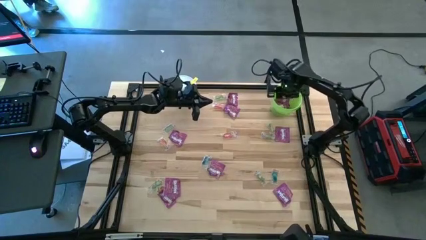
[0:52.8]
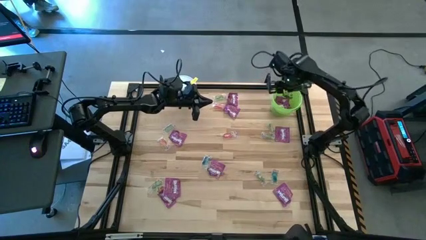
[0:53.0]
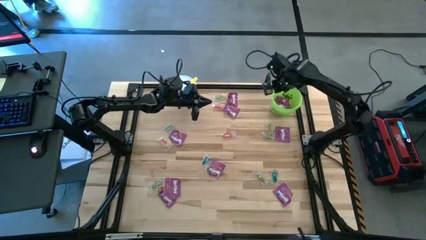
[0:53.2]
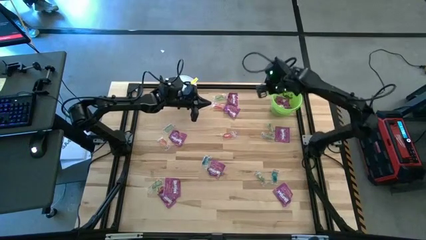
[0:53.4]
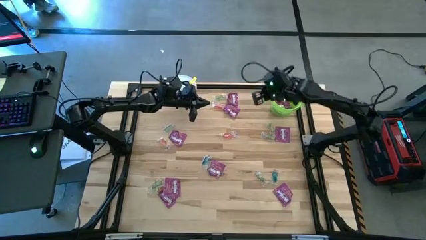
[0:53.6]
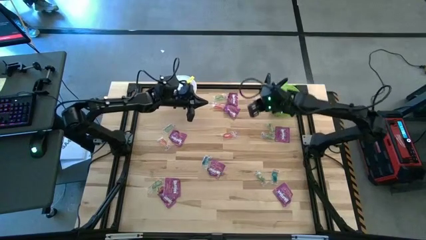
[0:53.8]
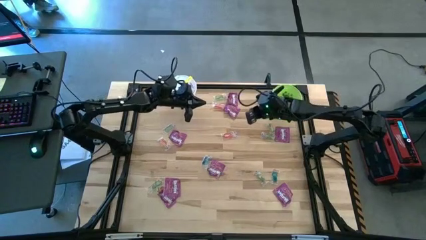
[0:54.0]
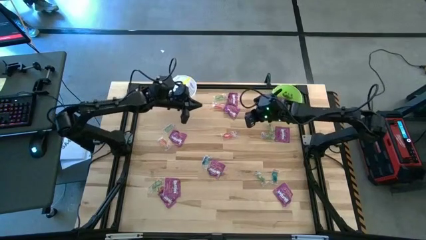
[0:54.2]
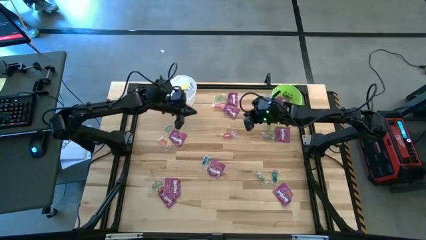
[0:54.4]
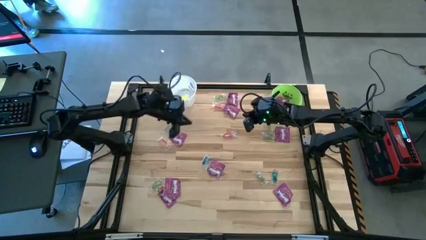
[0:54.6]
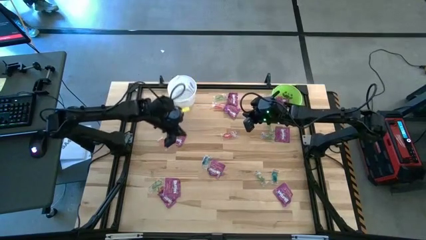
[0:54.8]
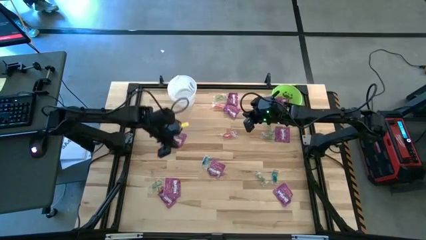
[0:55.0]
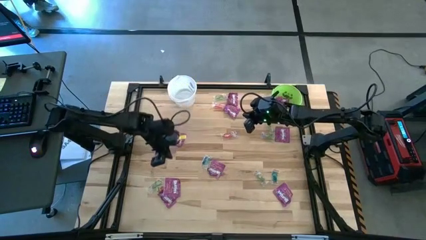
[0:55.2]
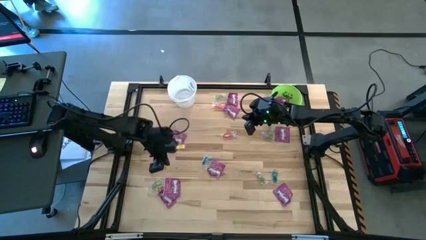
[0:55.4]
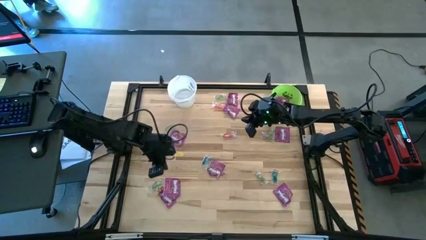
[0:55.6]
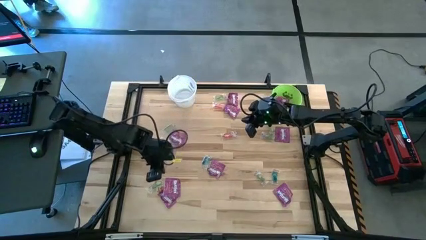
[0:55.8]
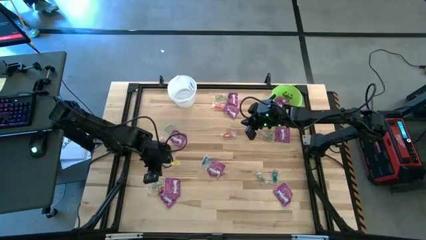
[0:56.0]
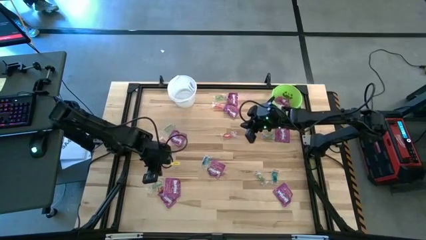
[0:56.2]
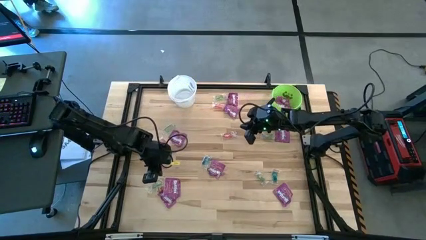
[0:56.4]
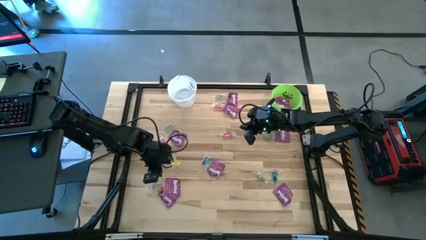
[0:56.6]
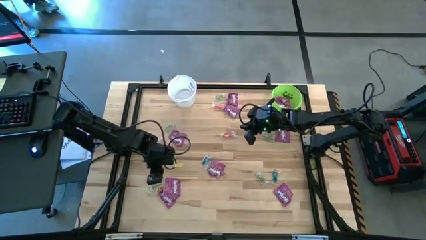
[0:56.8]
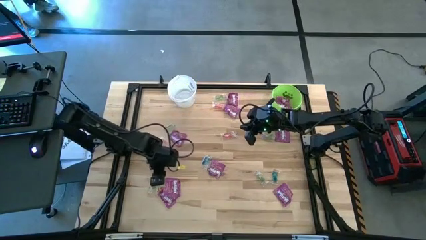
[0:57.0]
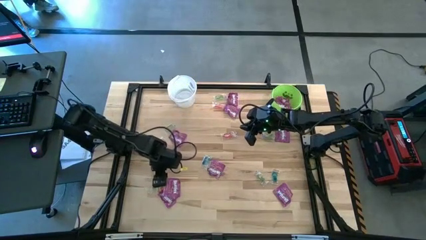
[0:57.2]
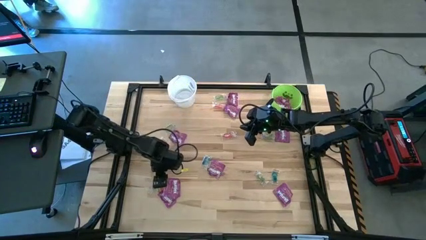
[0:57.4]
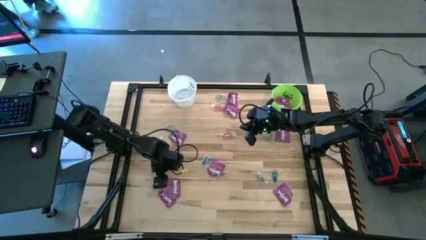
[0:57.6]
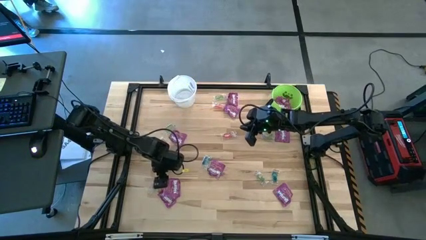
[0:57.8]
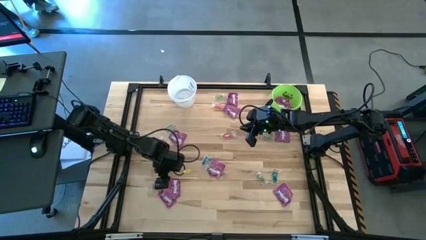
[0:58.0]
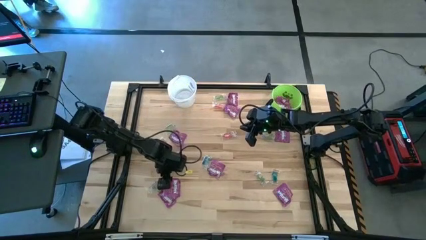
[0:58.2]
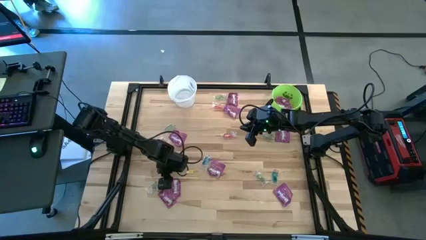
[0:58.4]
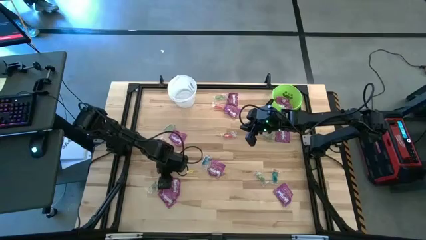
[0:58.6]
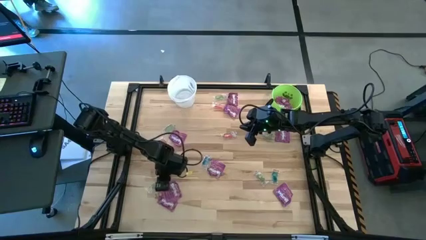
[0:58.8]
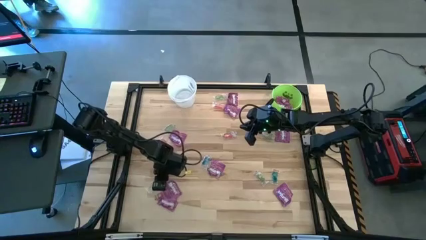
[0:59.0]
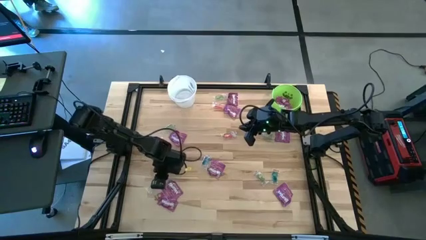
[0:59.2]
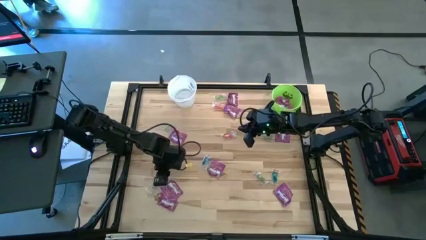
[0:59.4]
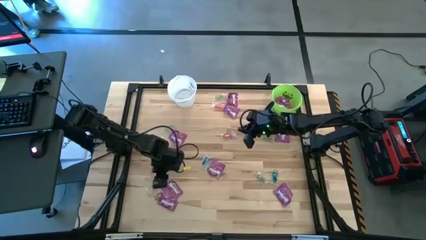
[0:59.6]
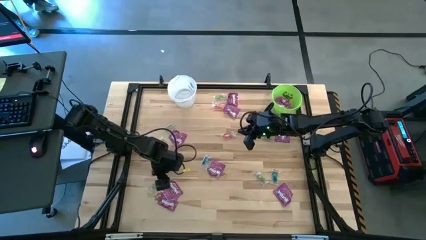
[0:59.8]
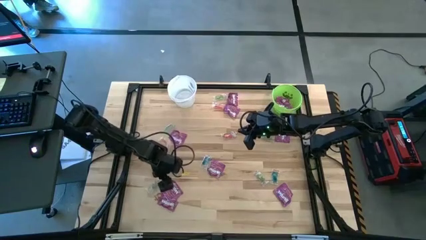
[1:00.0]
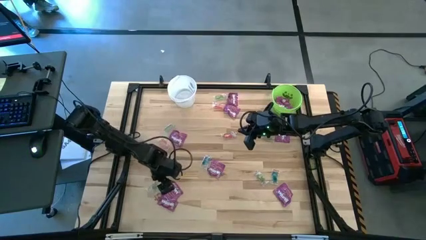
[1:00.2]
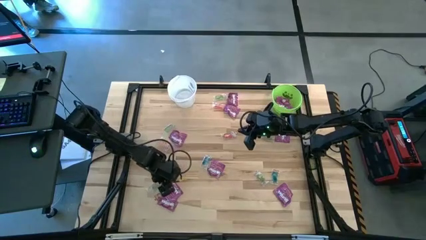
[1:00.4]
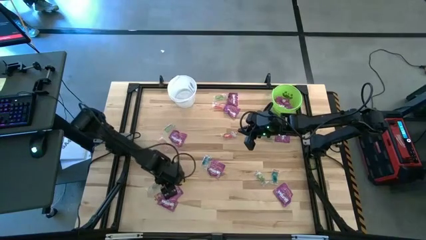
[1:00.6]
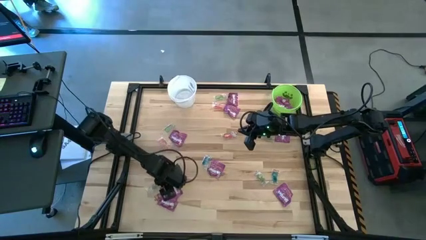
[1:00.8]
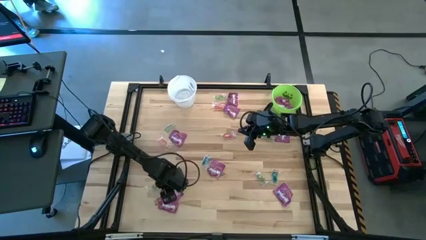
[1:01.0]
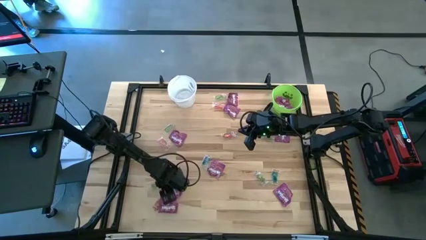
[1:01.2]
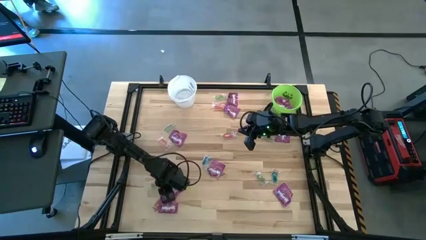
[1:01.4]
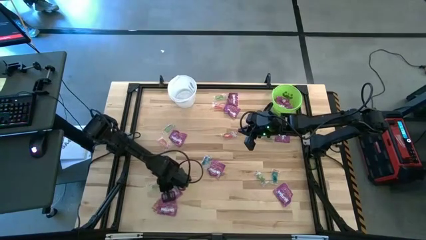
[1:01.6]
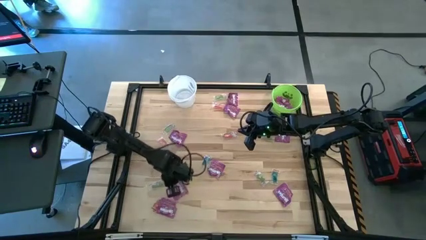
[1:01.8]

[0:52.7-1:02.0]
Task: Sort candy by brand, put in halloween buckets
Put the violet candy into the green bucket

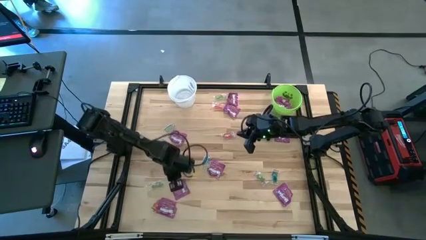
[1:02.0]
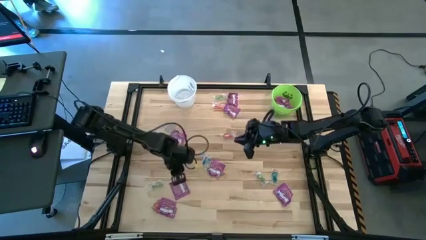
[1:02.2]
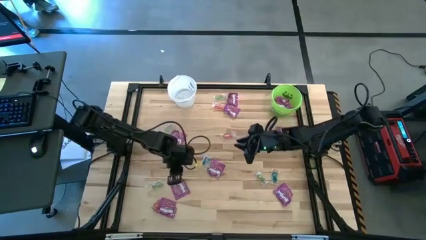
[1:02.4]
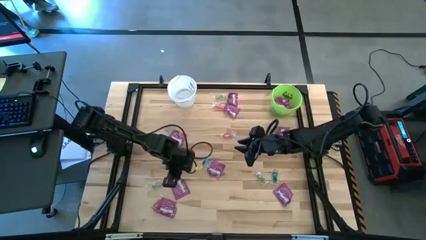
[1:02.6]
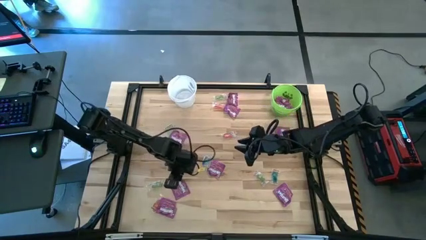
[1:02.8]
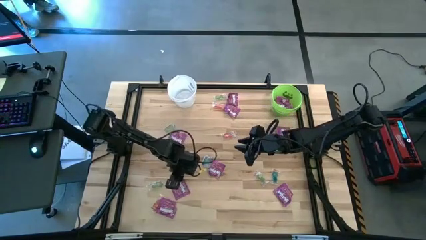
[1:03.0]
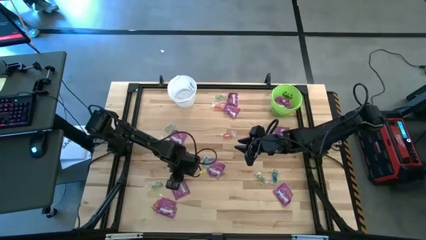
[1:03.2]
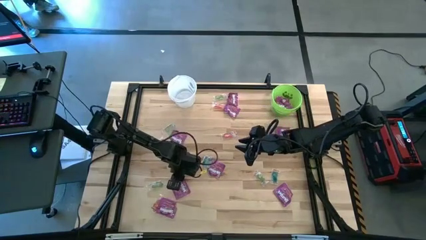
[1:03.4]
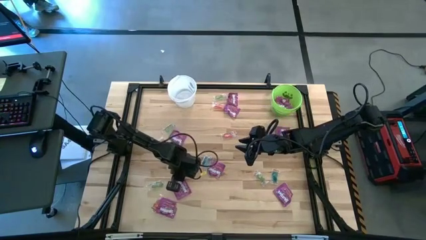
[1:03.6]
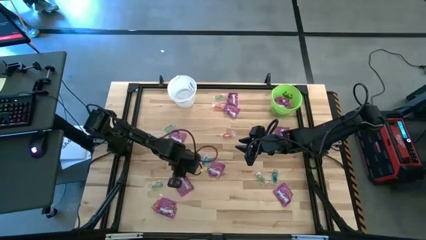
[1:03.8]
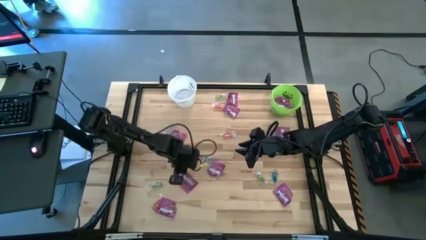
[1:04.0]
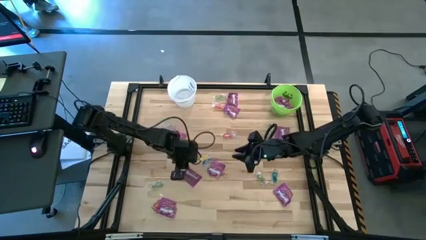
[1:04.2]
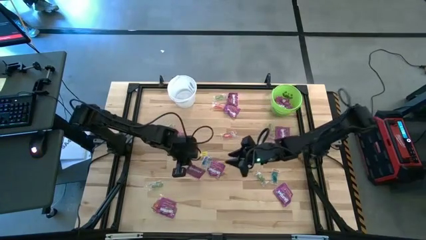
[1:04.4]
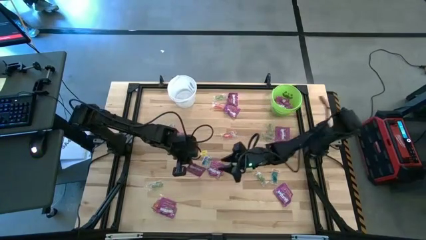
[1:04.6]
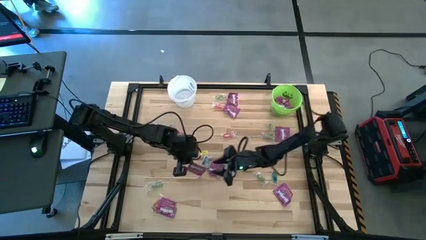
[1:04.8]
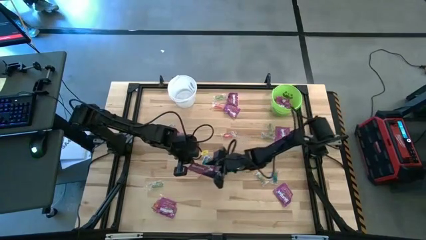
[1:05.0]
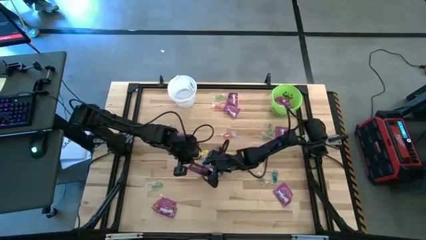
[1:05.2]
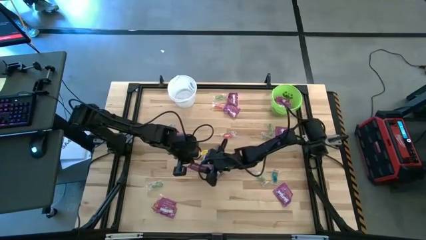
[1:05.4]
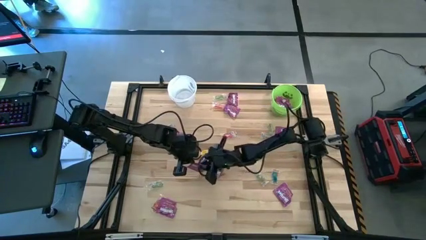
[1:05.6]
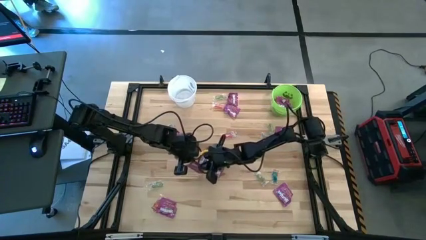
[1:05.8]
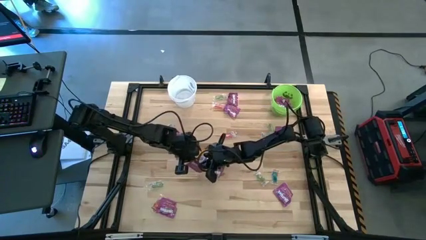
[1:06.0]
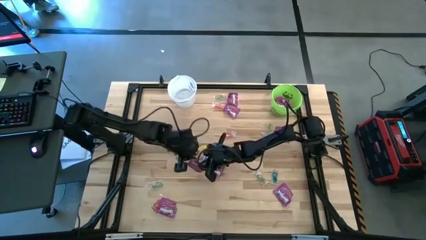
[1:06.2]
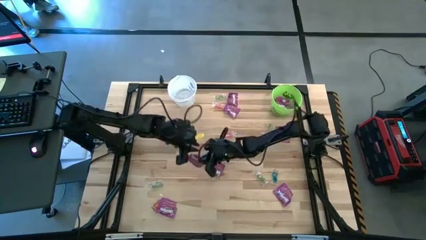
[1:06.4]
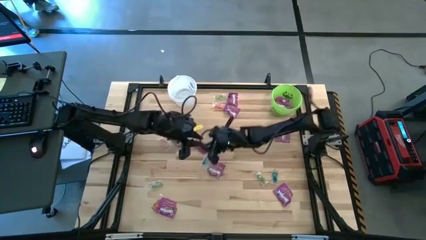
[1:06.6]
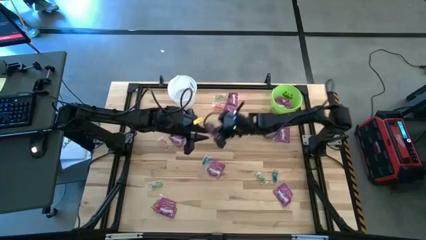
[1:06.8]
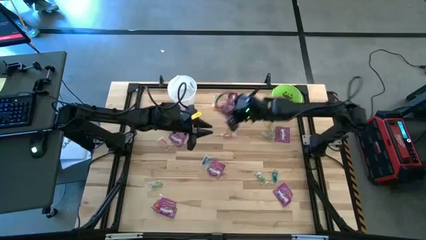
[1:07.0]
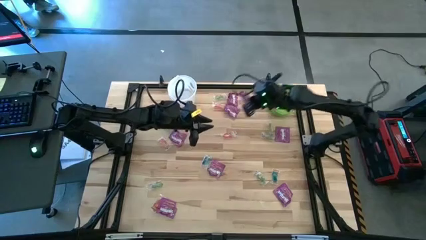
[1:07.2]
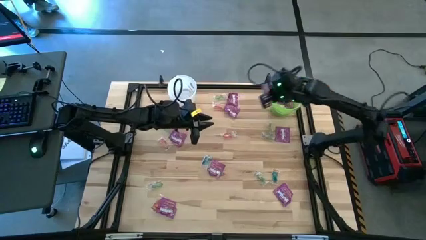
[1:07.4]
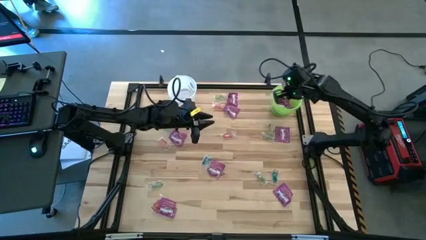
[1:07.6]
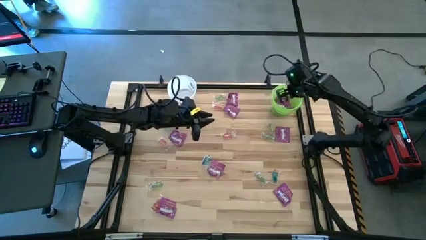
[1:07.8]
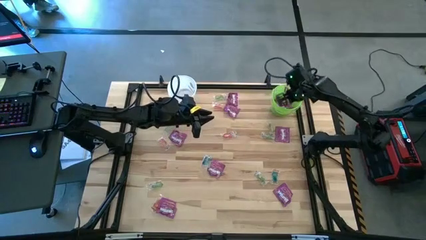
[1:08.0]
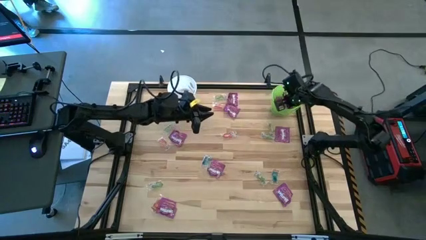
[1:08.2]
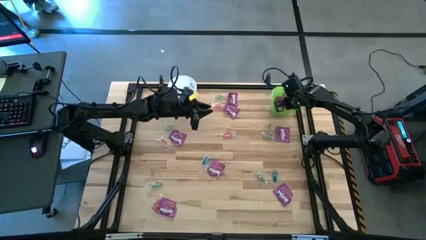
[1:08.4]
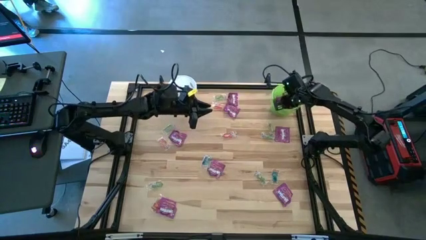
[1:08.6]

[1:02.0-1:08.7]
Put the violet candy into the green bucket
